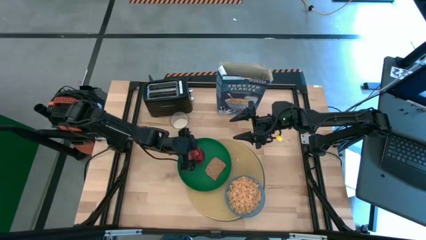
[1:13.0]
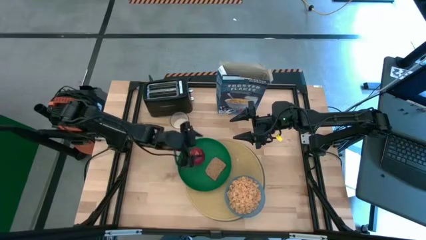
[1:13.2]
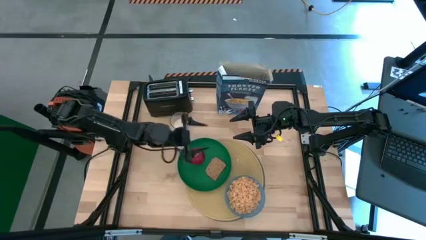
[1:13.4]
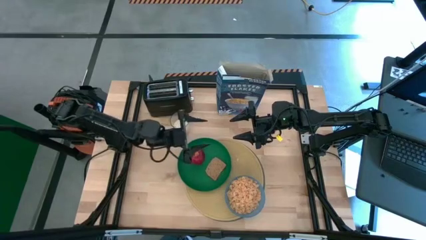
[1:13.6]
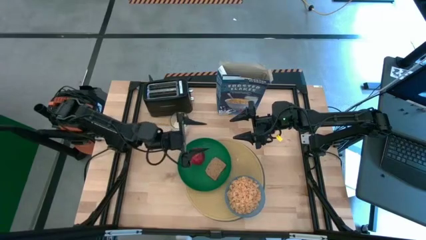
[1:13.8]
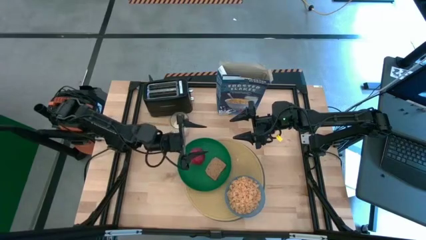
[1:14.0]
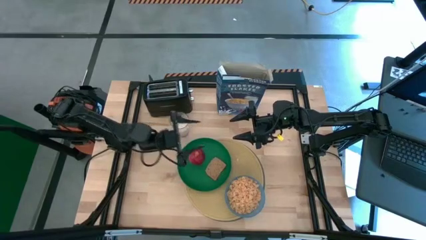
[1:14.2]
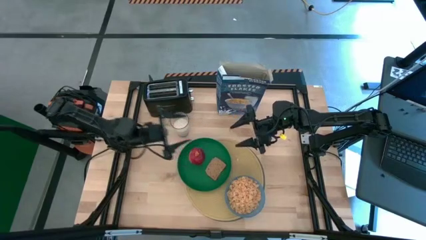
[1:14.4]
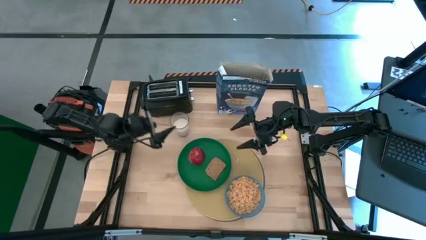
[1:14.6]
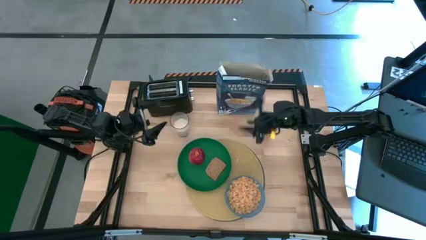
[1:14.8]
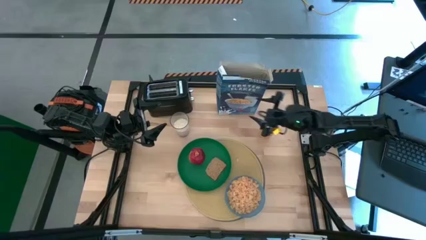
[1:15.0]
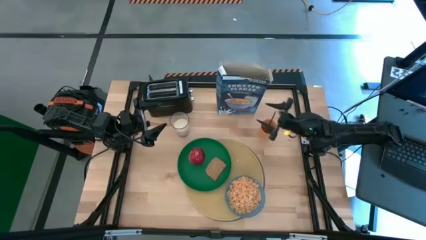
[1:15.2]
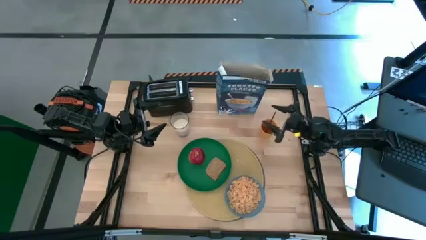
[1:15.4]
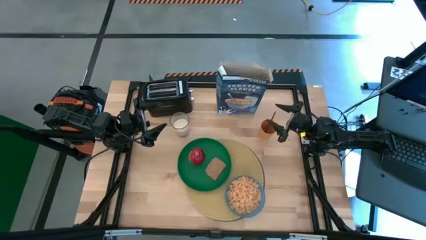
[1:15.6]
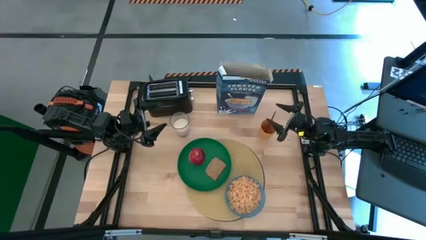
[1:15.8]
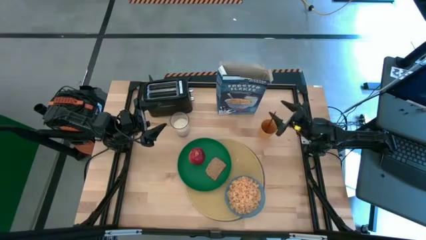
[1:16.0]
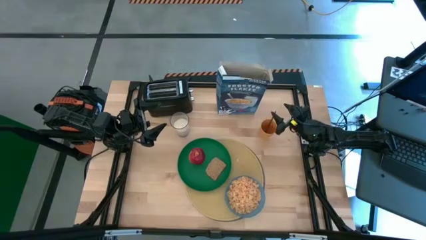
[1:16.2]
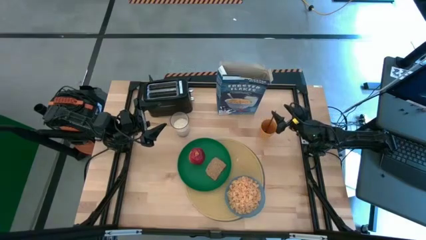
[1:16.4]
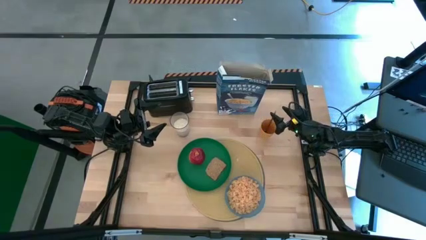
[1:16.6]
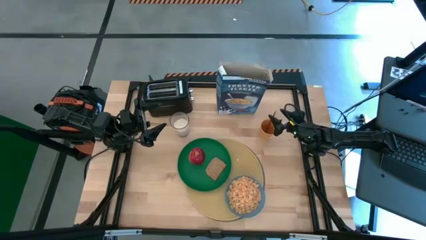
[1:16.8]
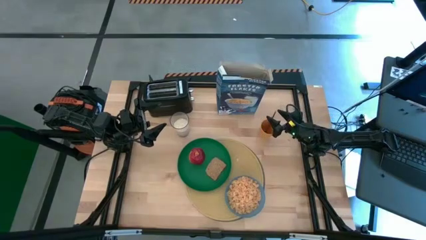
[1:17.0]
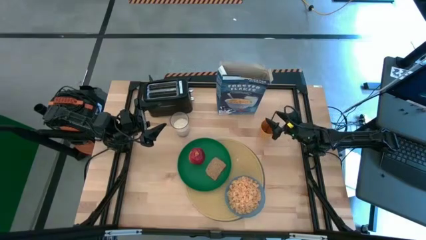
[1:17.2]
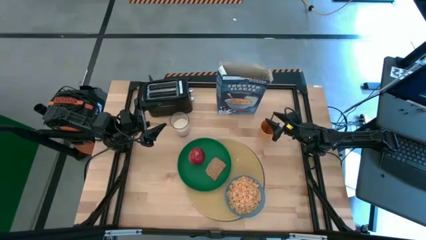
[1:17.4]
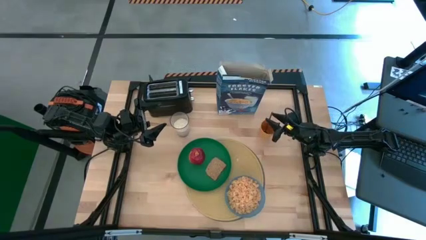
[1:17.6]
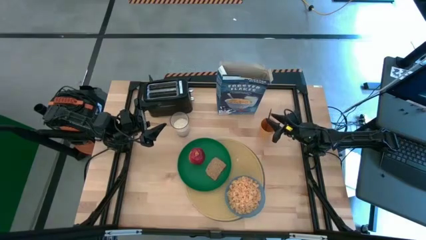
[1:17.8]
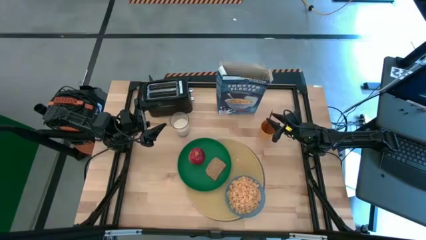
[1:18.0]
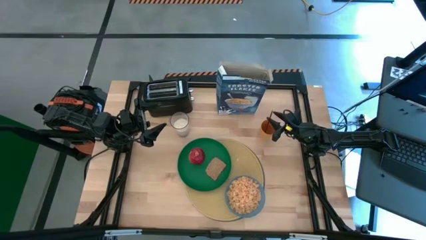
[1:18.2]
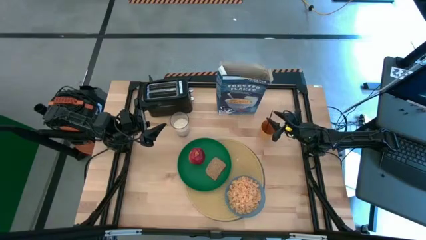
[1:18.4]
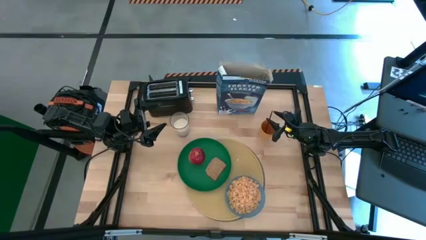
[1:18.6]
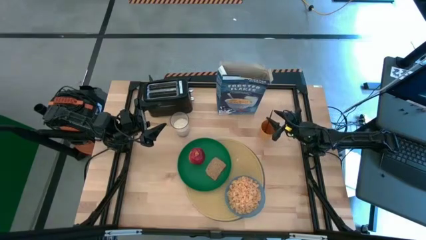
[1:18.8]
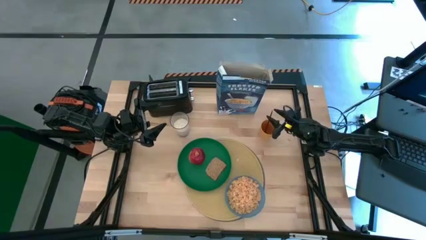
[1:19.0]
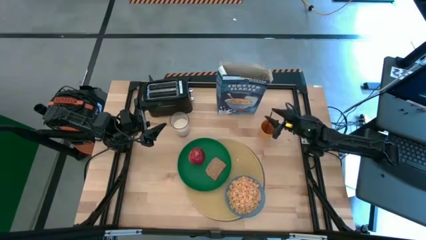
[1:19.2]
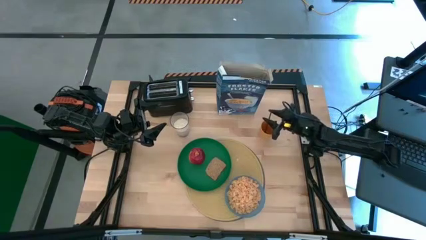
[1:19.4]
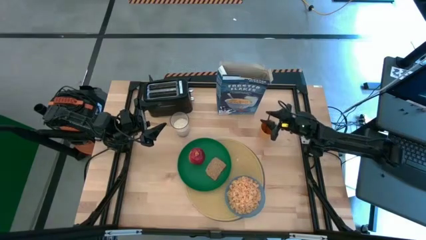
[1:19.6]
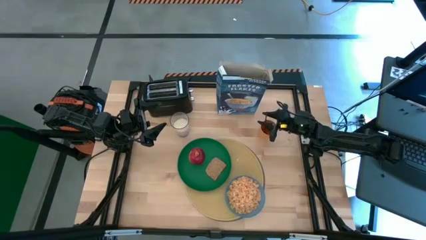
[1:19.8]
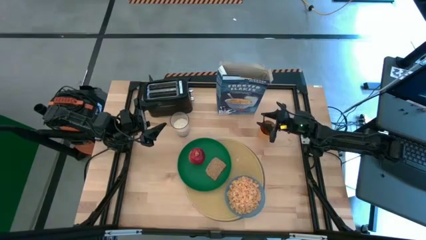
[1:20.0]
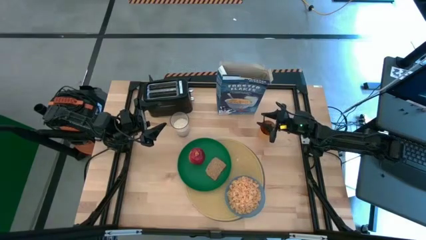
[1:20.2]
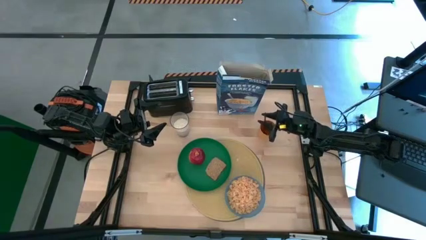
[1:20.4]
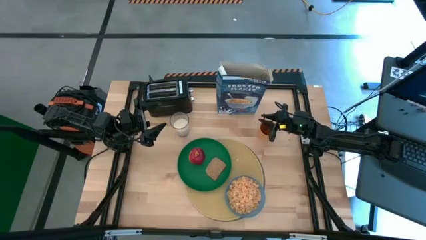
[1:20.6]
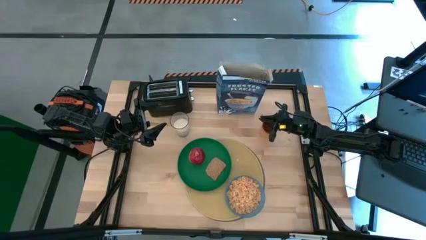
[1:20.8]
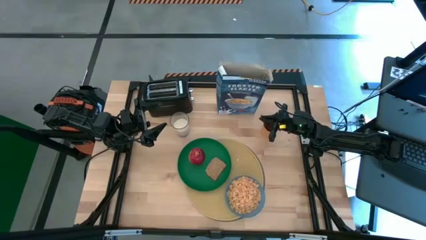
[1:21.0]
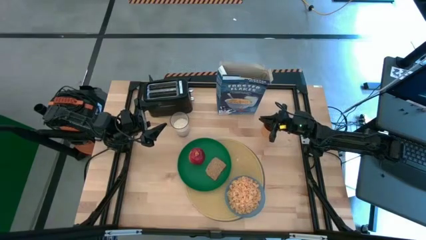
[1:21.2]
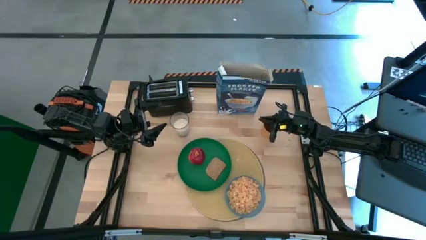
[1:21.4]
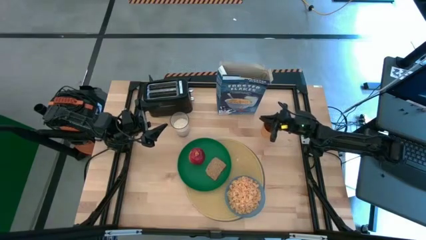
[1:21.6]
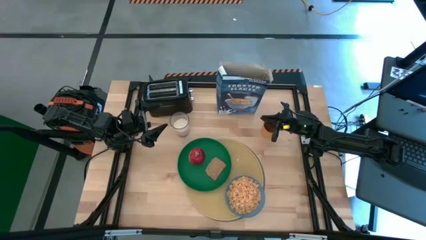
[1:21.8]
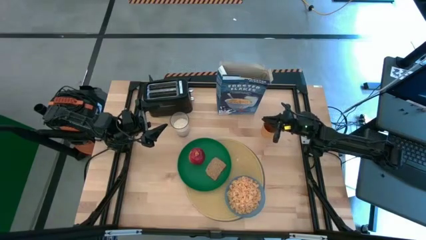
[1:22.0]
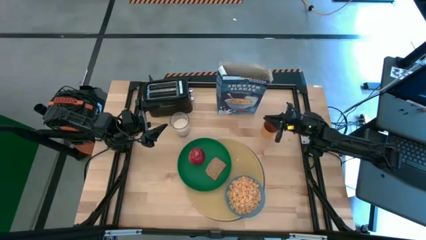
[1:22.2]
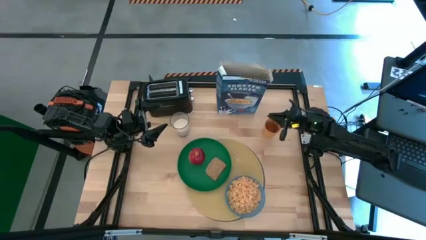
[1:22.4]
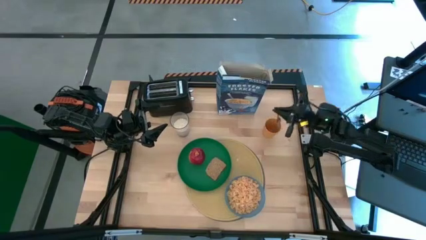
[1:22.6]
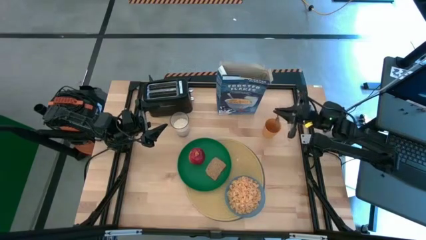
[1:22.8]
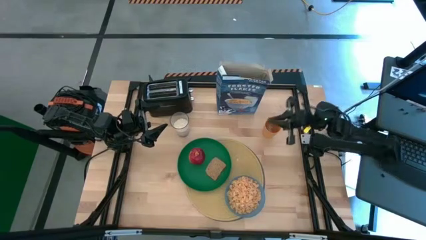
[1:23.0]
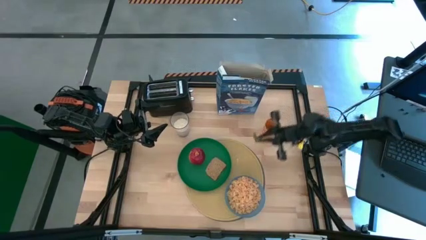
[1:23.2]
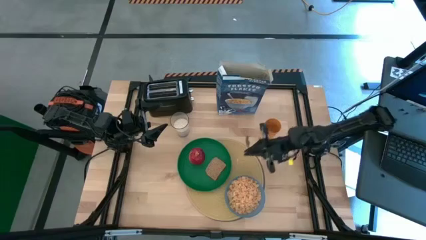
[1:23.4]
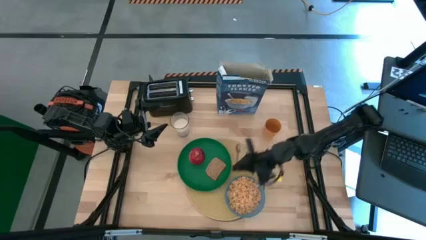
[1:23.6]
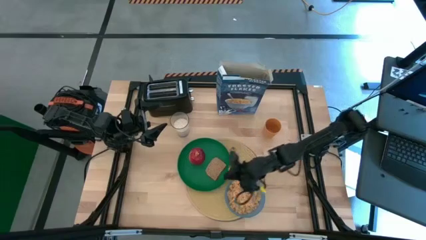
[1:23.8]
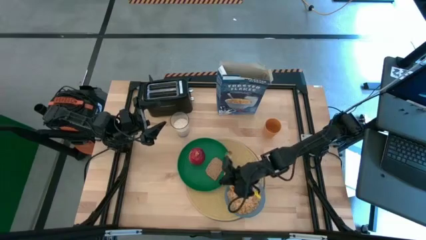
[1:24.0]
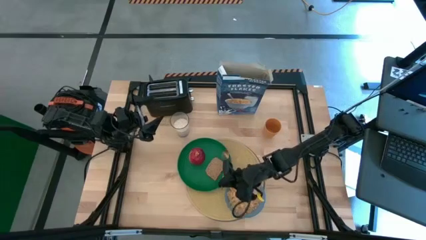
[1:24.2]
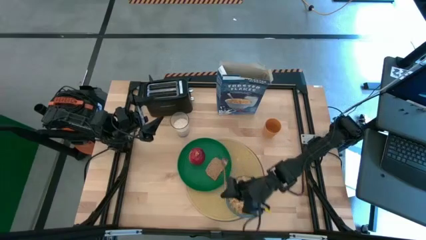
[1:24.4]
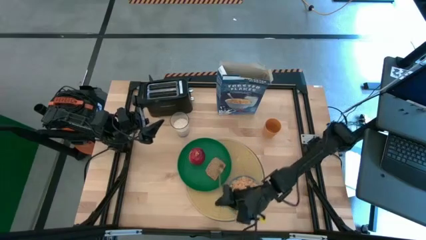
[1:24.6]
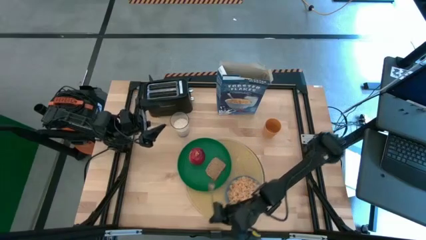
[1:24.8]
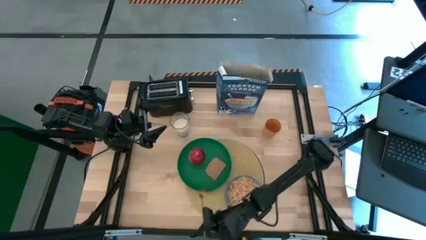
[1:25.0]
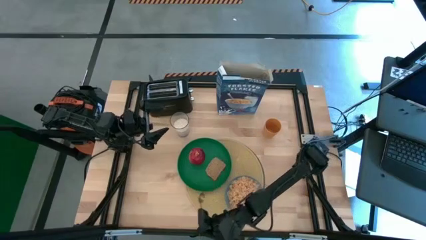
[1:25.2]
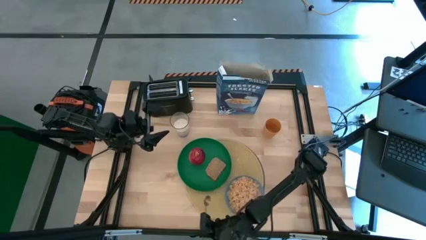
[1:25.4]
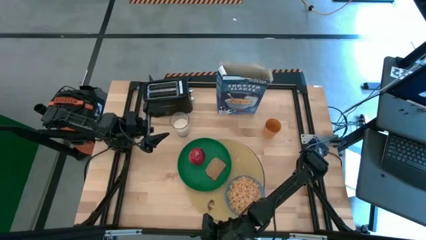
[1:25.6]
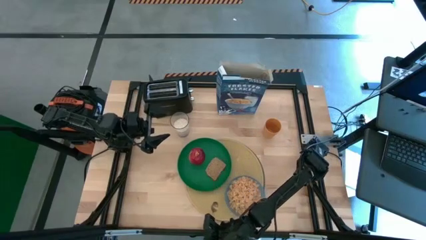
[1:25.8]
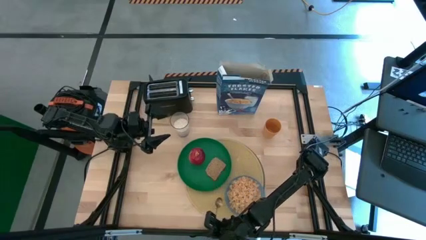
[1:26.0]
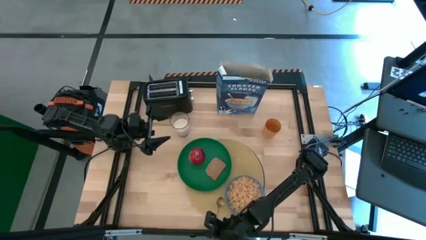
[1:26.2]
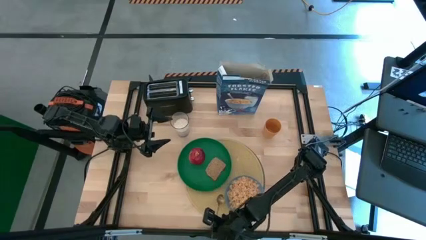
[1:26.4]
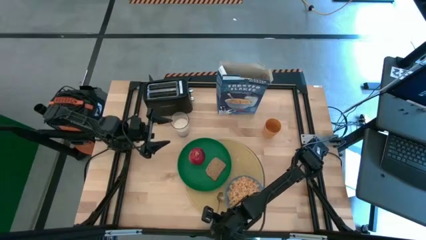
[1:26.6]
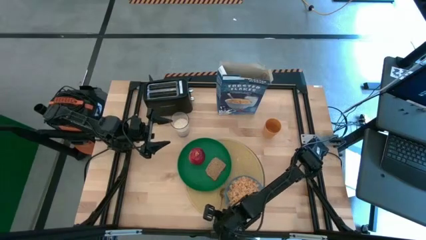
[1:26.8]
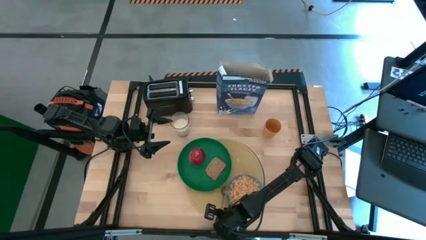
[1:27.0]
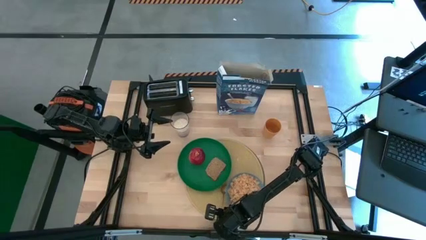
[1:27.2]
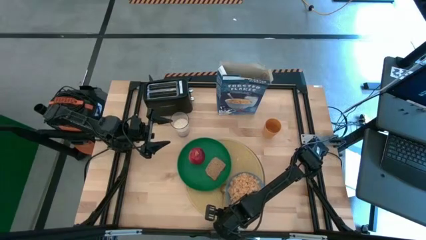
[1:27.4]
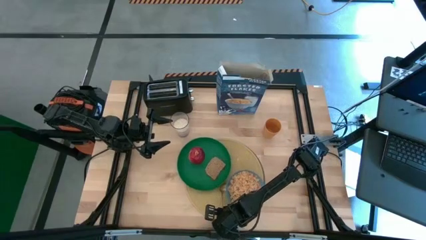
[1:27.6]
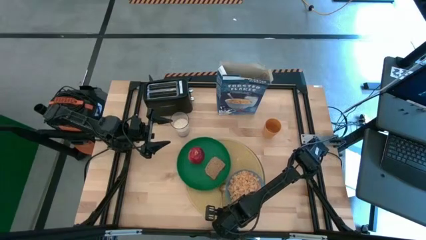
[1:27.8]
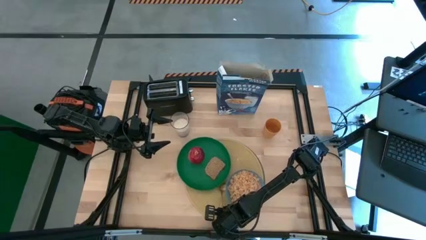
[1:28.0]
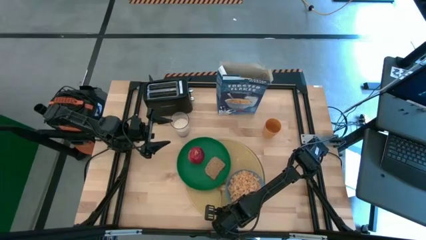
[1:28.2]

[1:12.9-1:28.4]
Task: Arrange a breakfast setting
Put the gold spoon between the green plate and the blue bowl

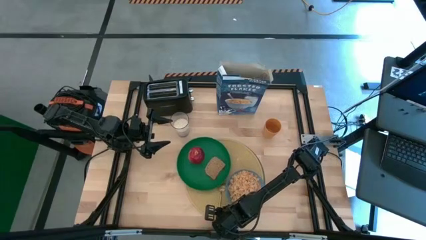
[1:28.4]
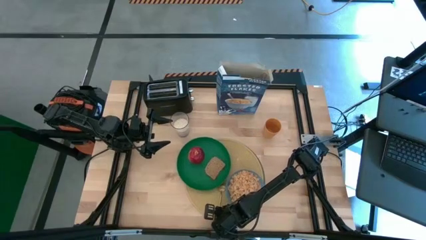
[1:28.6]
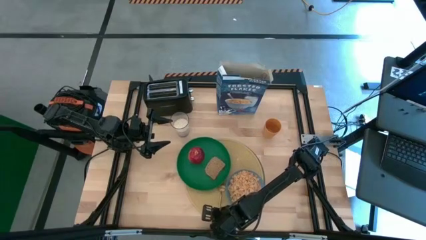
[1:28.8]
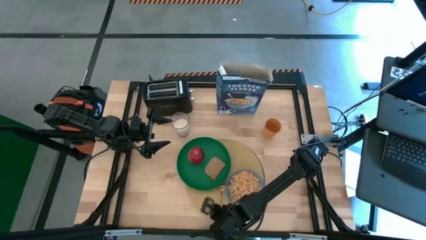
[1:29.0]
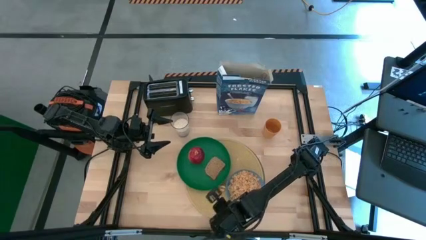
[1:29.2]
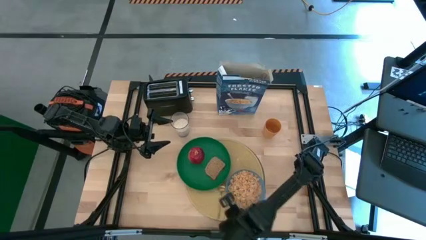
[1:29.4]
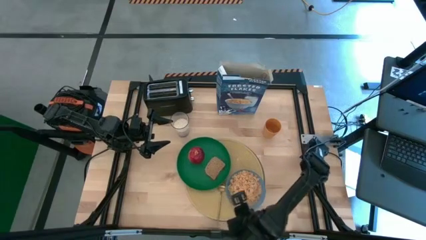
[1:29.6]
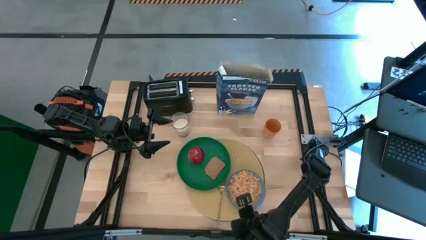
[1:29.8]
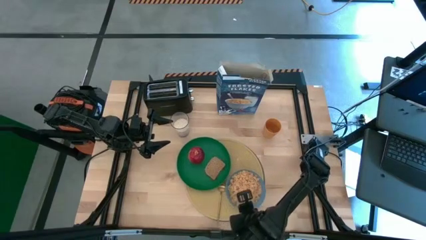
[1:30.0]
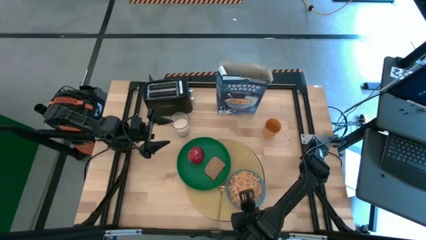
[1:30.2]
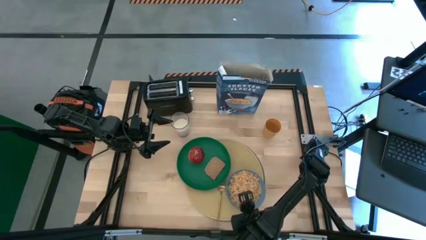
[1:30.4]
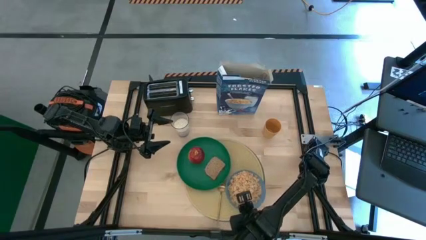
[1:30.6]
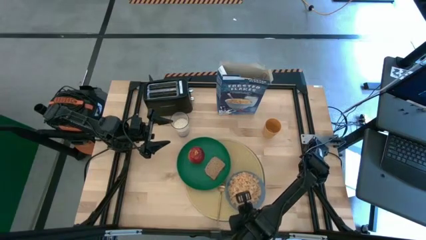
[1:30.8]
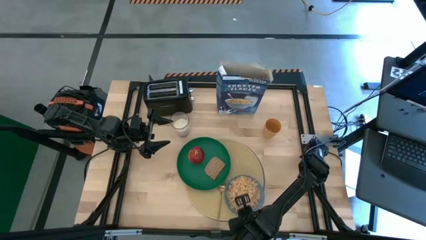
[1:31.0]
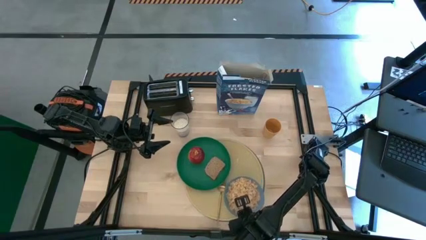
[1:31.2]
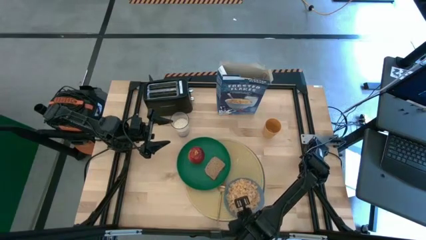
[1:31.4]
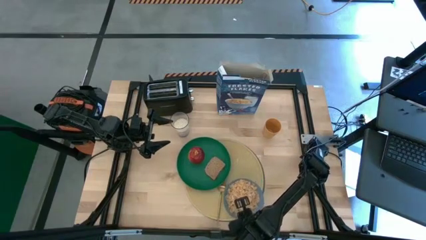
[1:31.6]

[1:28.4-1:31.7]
Adjust the blue bowl on the table mat
